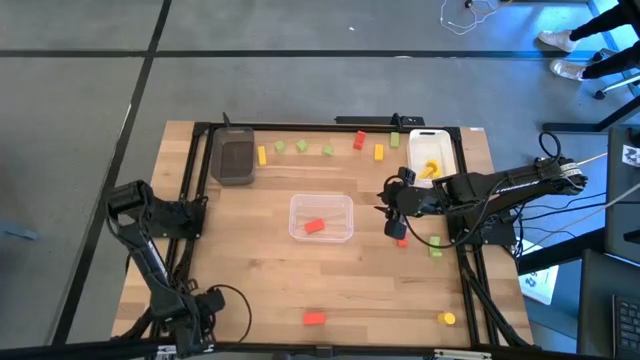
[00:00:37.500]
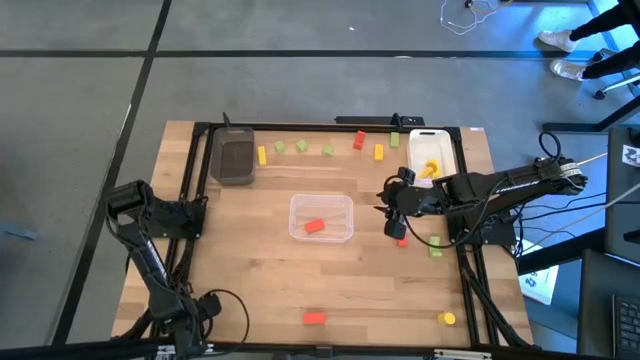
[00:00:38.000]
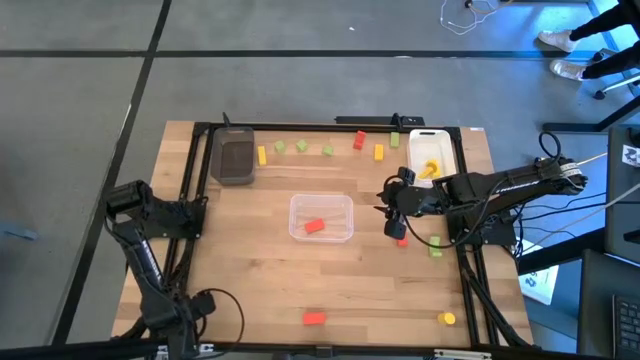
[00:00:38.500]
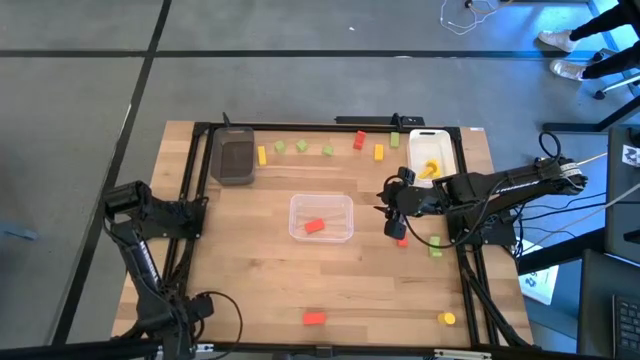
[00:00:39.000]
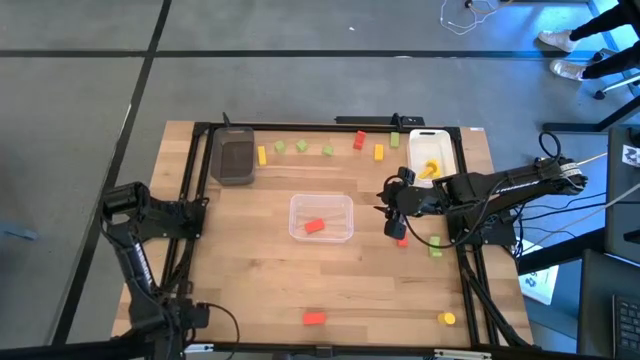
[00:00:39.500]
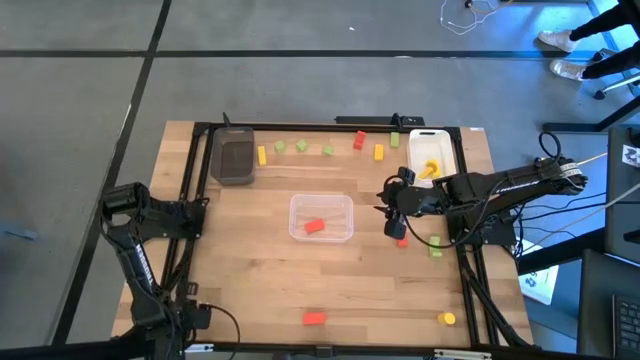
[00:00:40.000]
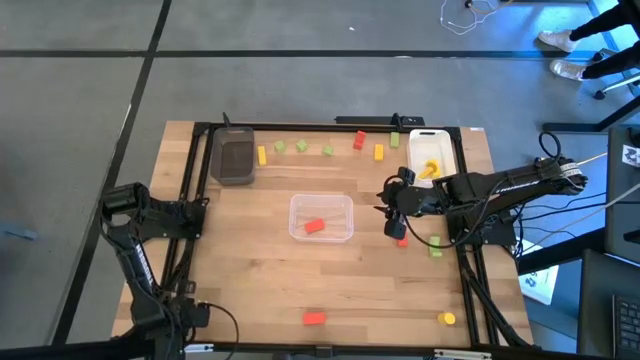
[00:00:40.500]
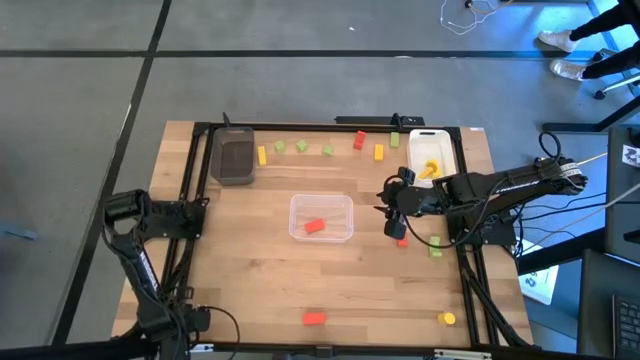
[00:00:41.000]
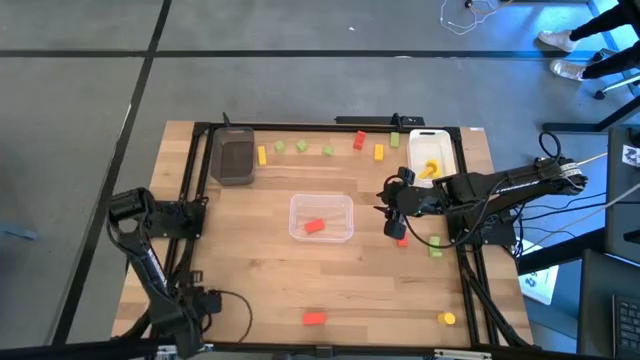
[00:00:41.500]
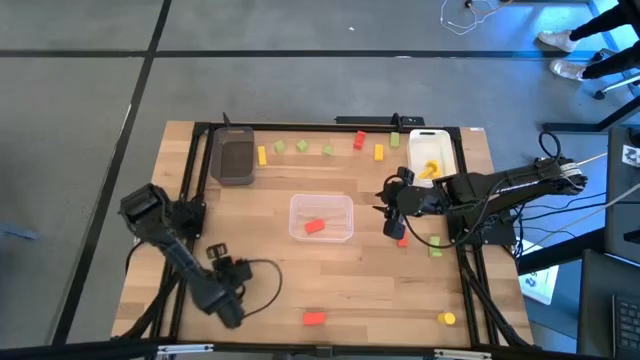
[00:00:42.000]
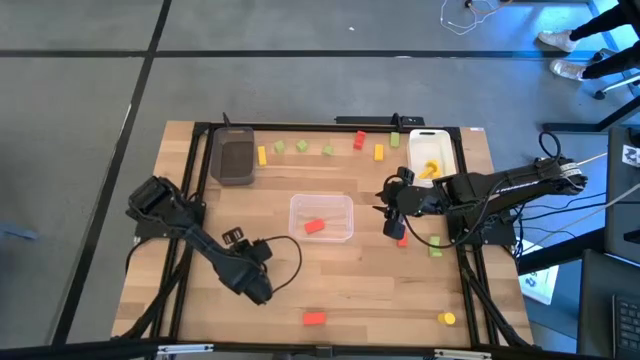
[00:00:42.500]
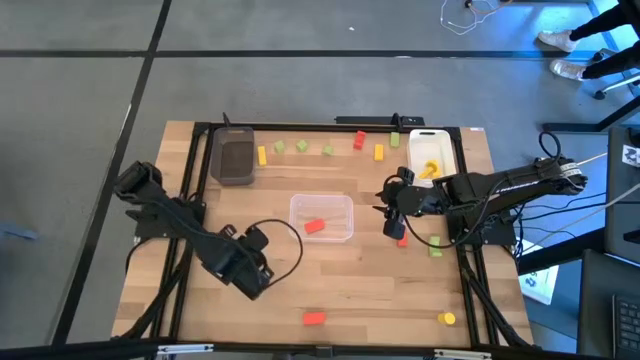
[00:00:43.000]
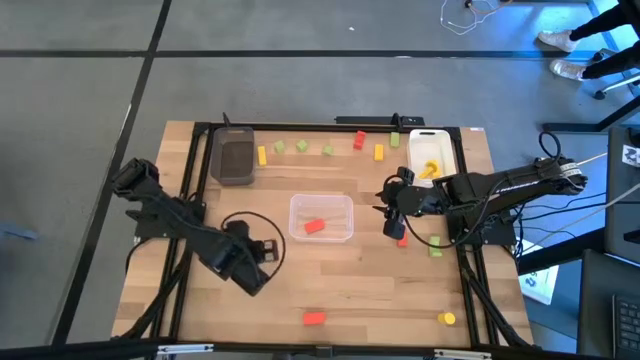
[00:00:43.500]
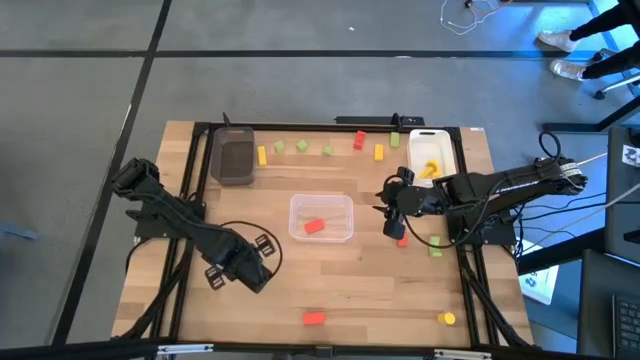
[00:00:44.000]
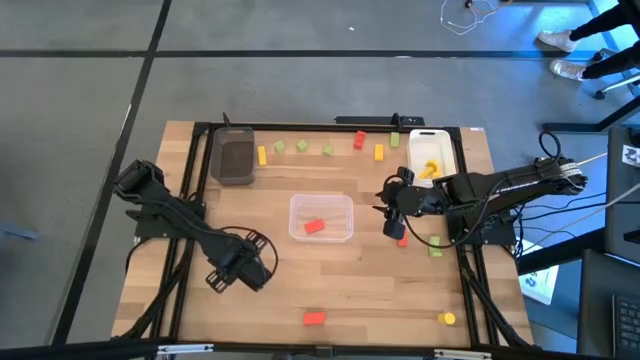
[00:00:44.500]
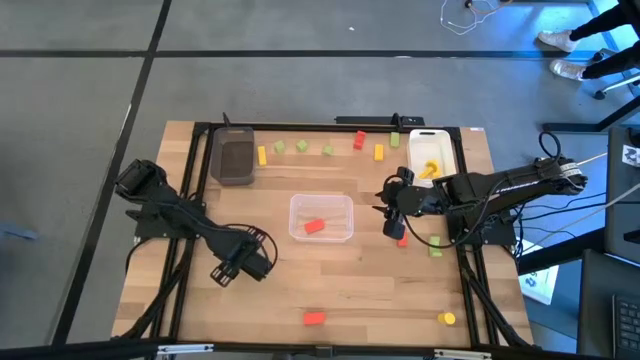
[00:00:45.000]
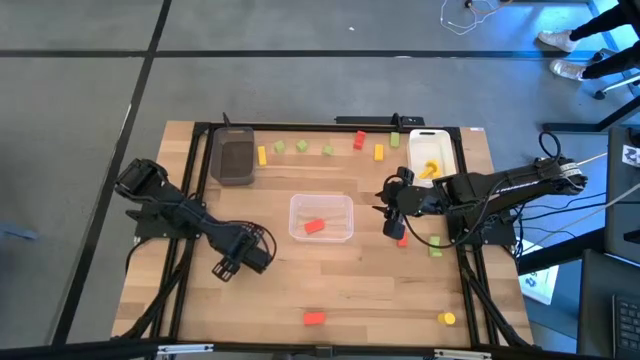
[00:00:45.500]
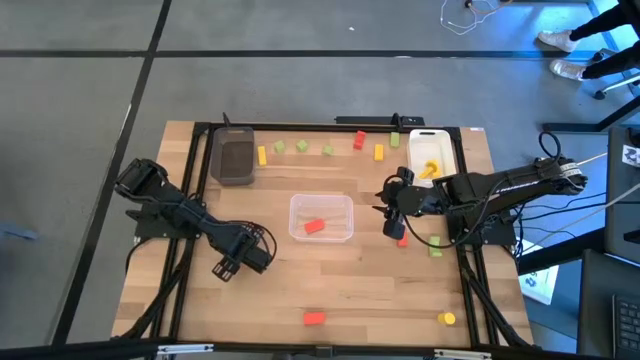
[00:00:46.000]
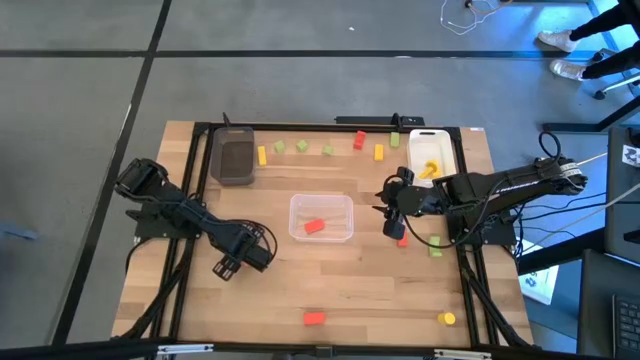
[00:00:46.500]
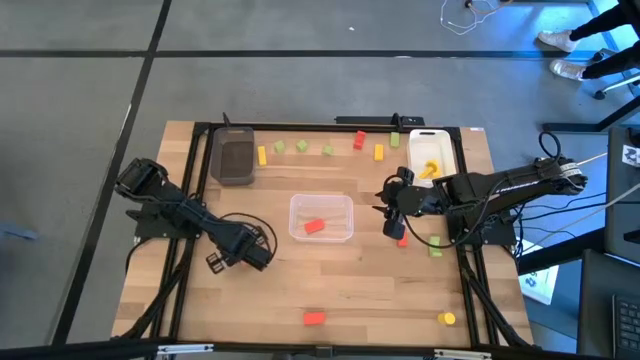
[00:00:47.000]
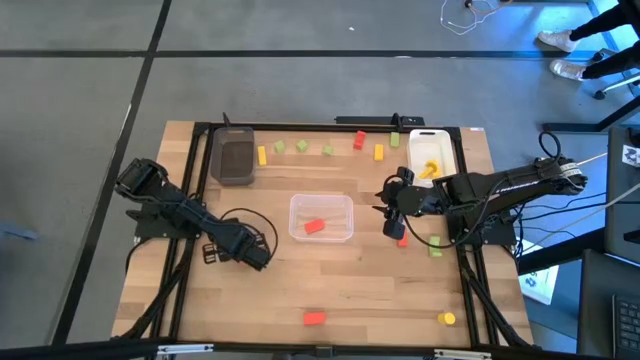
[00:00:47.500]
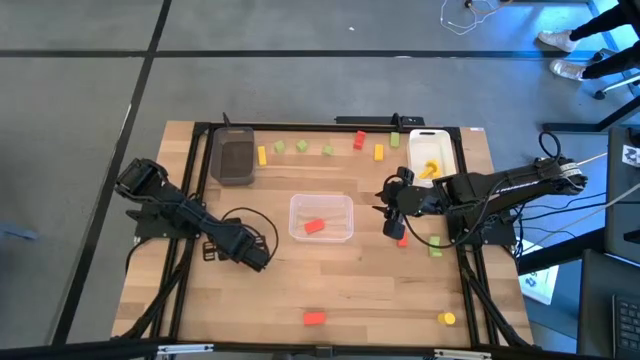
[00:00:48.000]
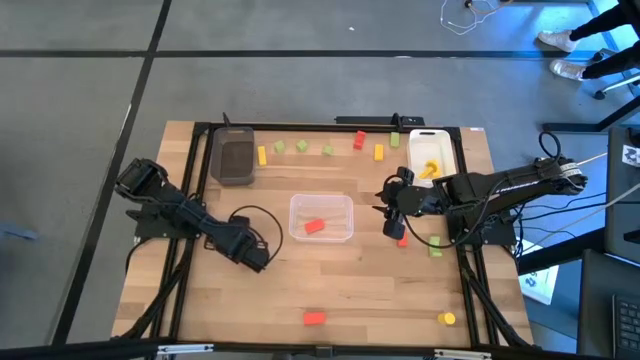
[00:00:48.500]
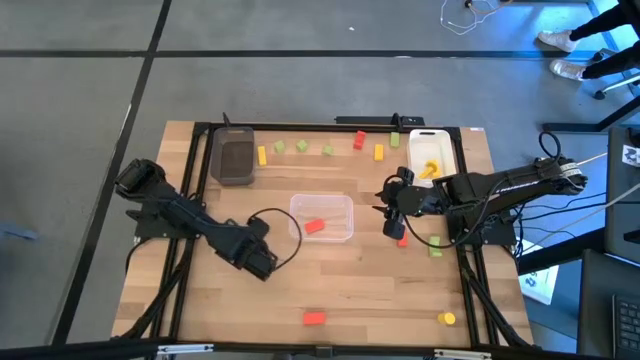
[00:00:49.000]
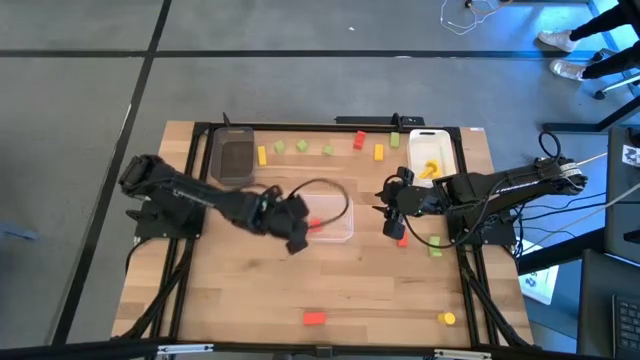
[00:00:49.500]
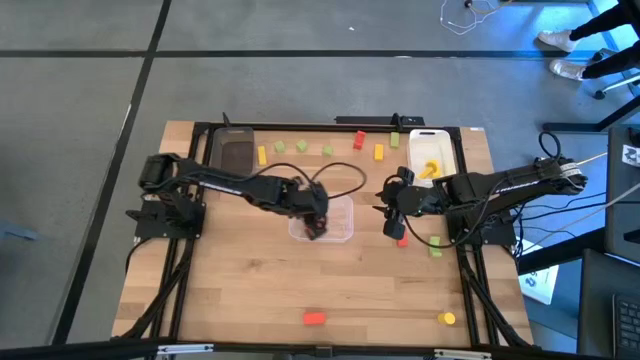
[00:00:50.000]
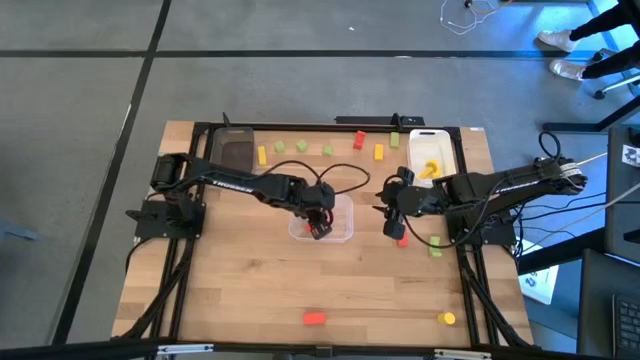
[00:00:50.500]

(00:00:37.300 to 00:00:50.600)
Task: Sort & place blocks by color
Put the orange block into the transparent bin

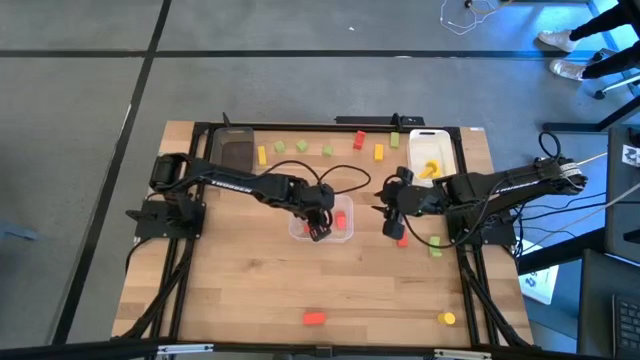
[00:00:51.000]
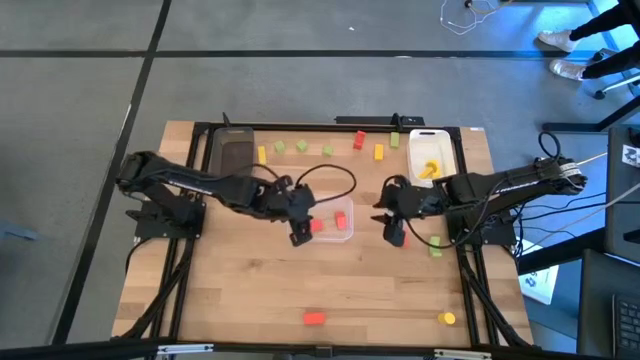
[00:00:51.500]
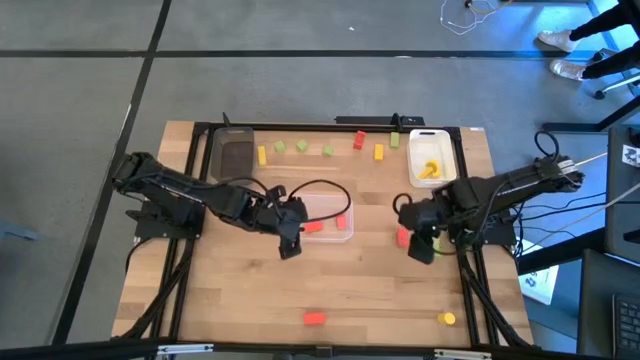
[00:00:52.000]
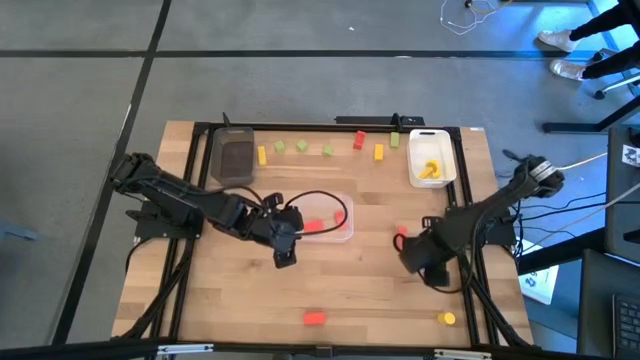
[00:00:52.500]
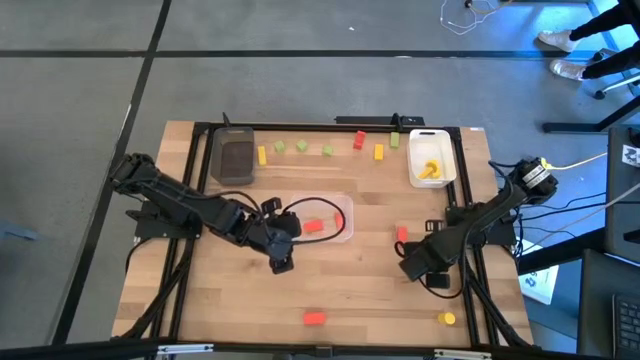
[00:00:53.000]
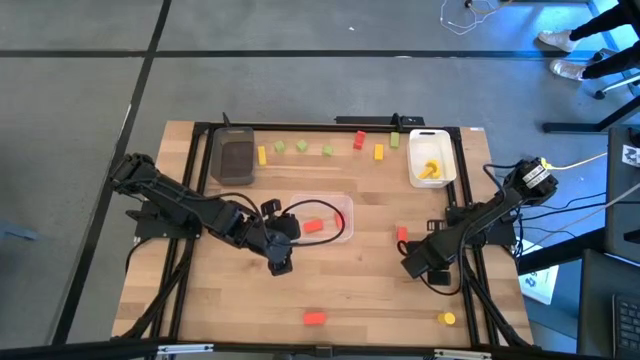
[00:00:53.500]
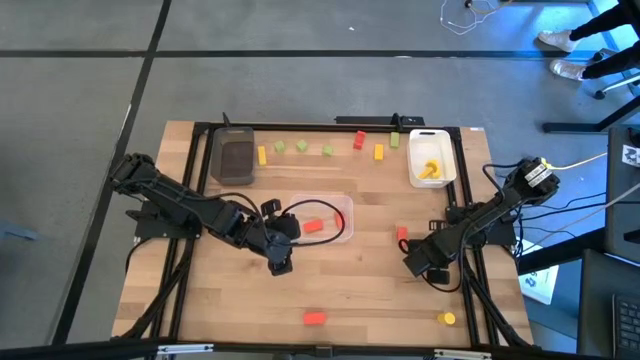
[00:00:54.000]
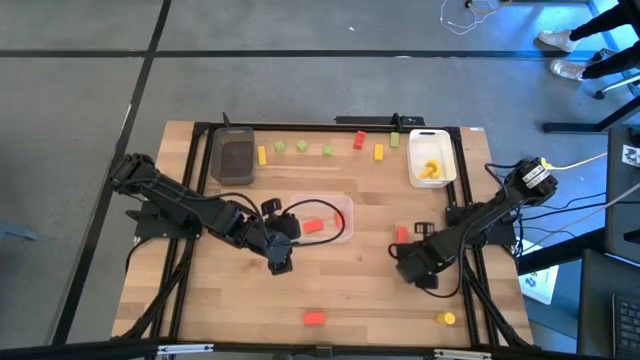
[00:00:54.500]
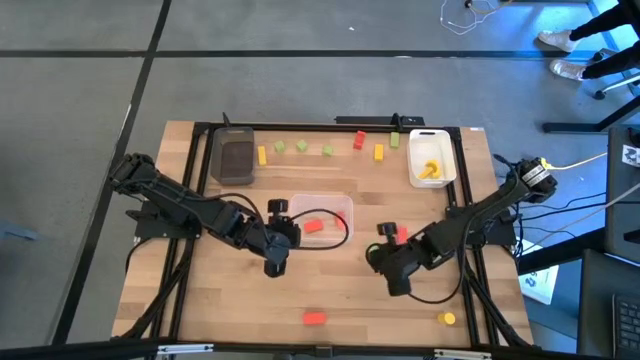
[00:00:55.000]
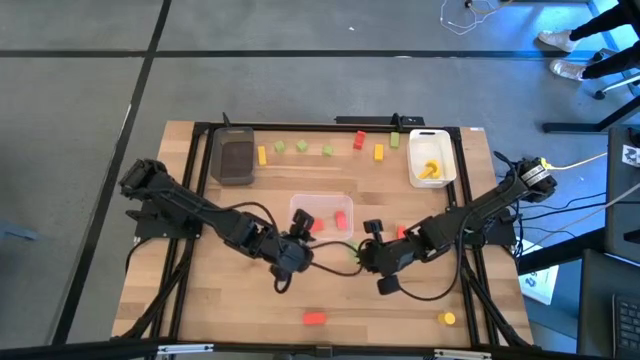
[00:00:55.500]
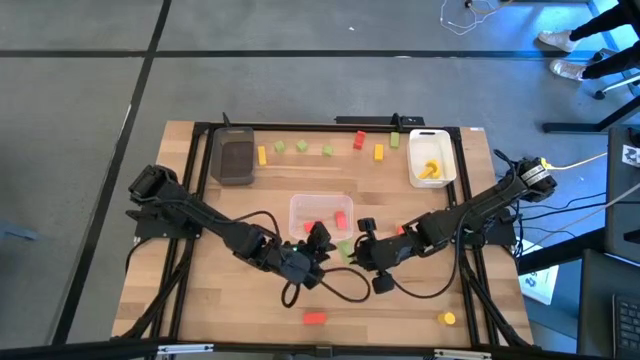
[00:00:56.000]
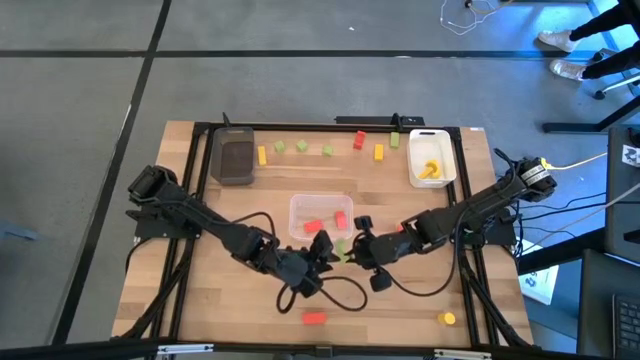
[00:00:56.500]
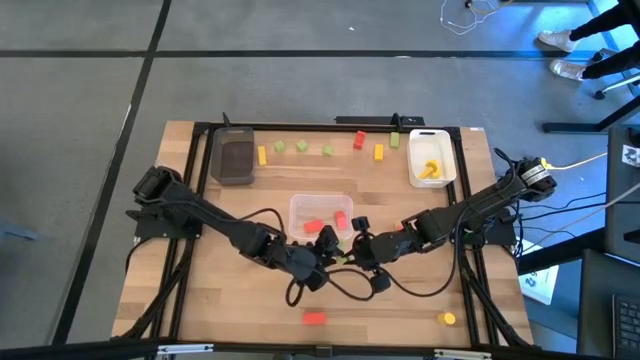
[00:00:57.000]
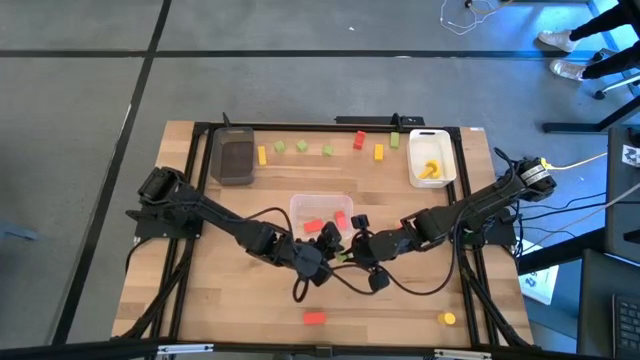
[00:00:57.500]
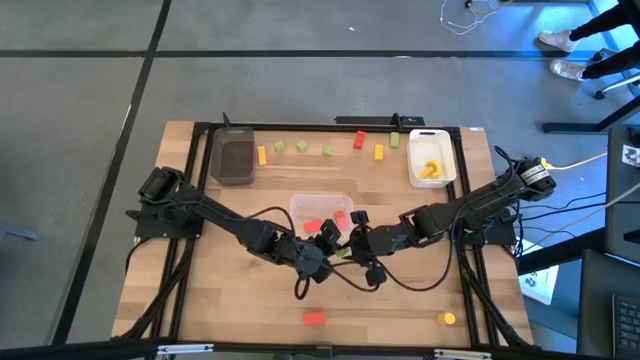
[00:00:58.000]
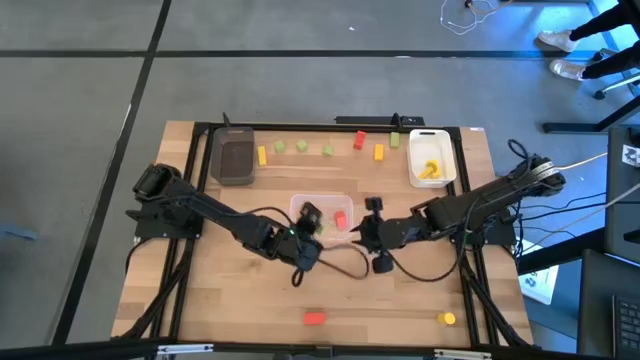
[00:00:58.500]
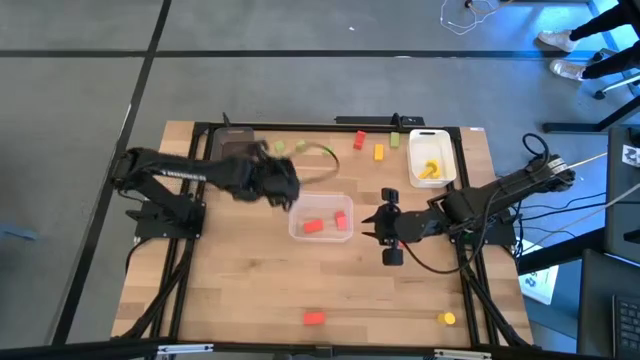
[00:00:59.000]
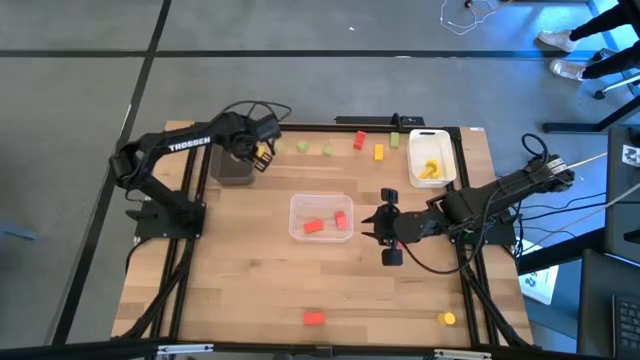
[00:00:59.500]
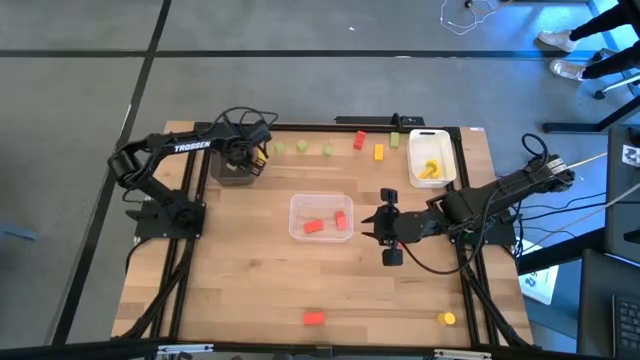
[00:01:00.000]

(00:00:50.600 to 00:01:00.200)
Put the green block into the black bin
